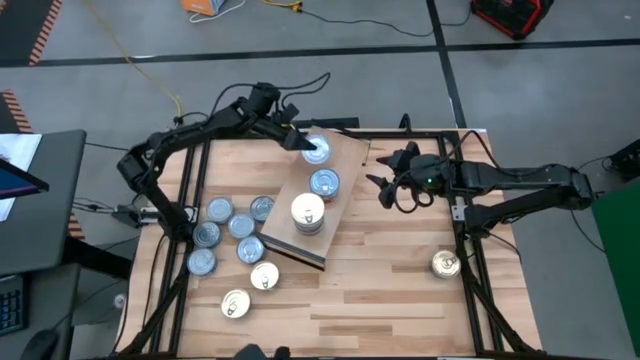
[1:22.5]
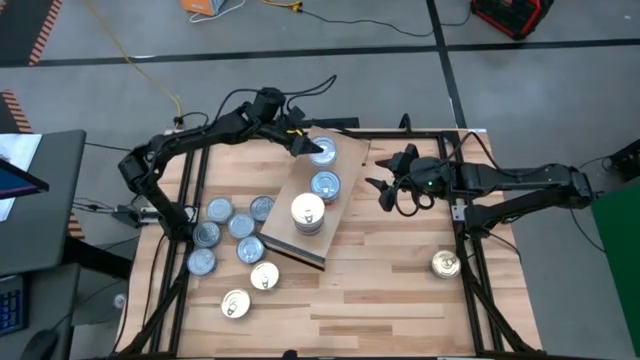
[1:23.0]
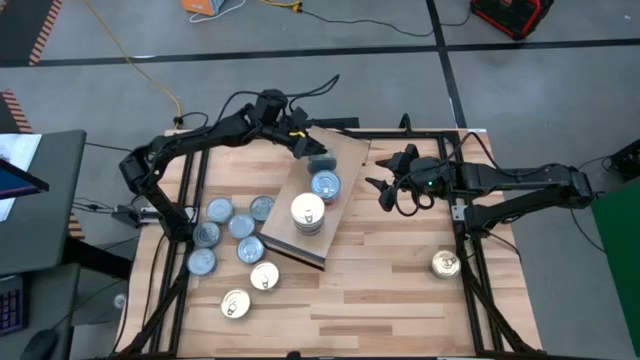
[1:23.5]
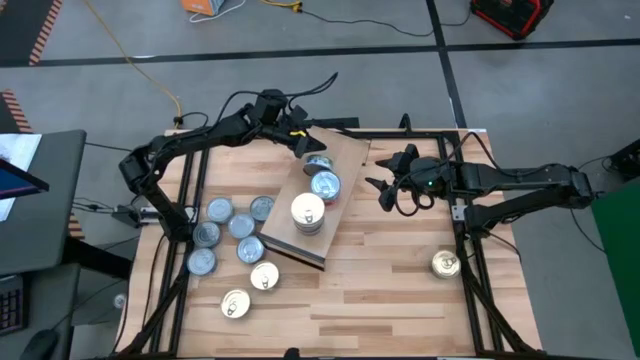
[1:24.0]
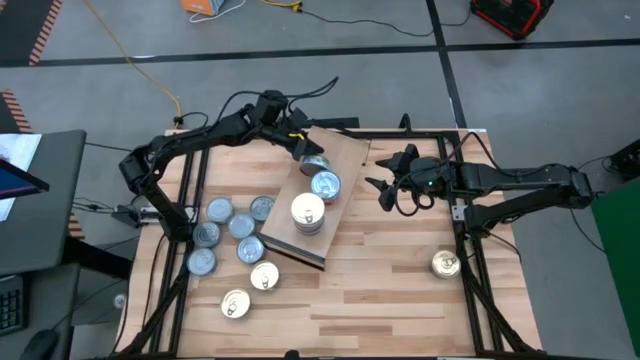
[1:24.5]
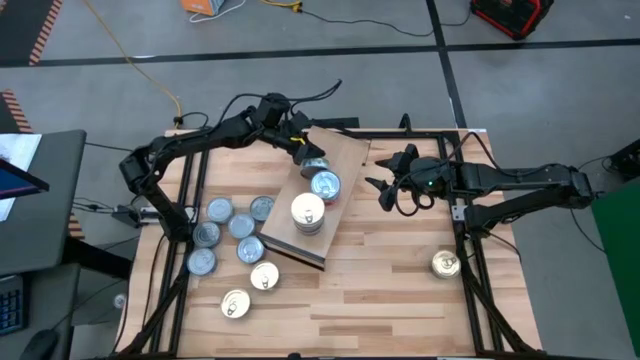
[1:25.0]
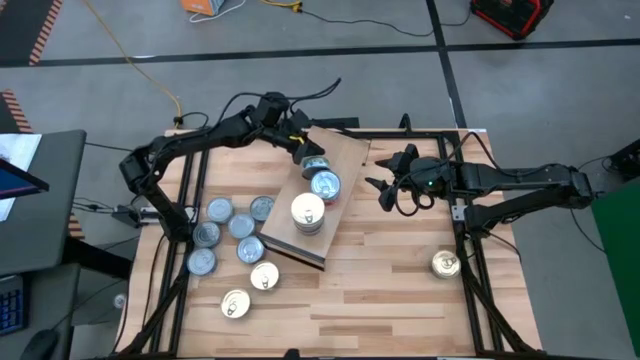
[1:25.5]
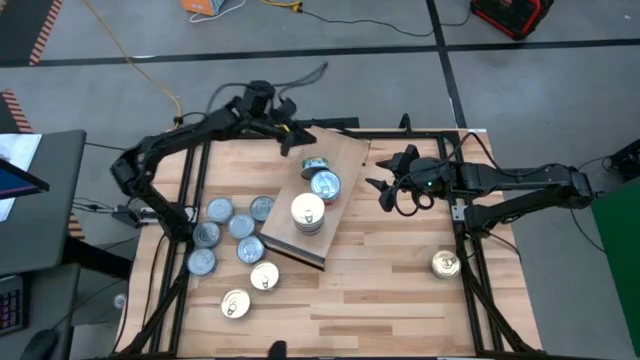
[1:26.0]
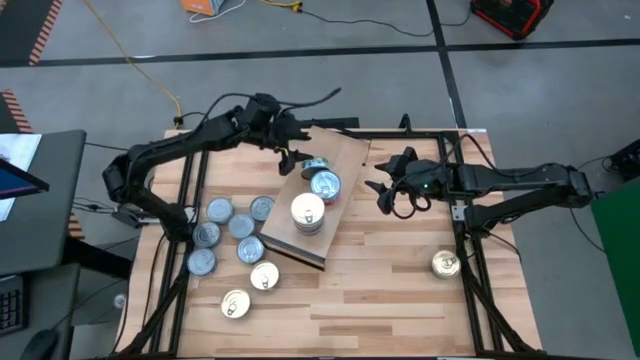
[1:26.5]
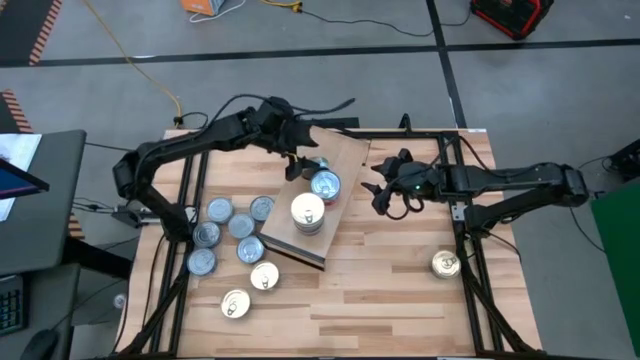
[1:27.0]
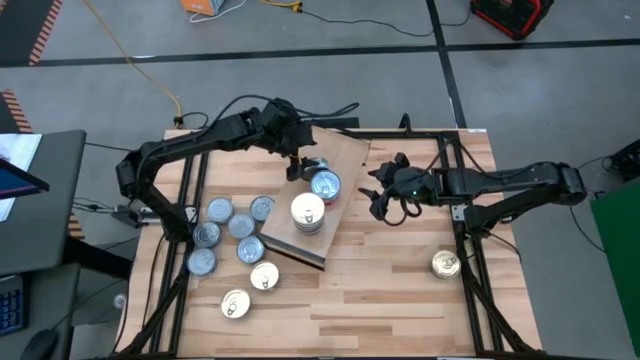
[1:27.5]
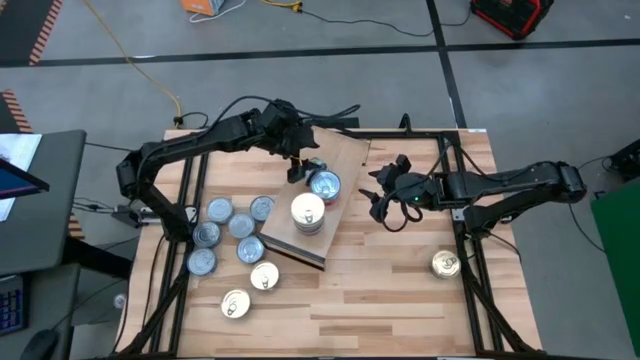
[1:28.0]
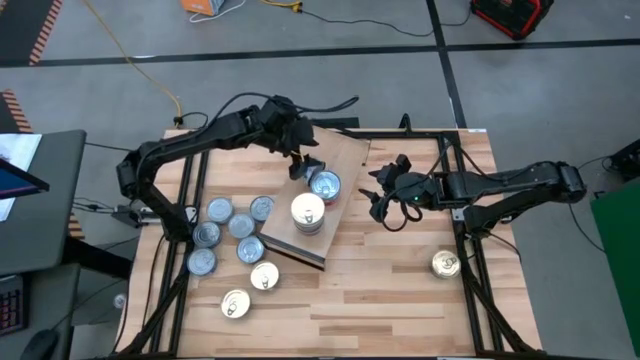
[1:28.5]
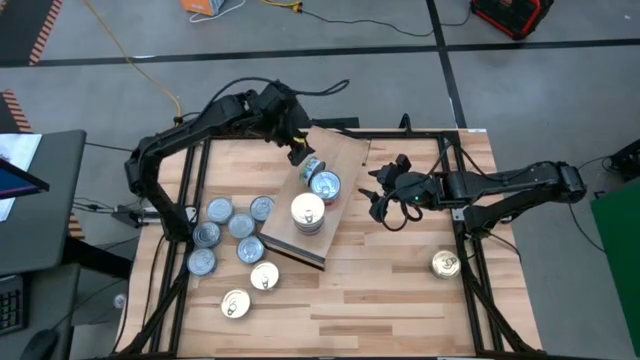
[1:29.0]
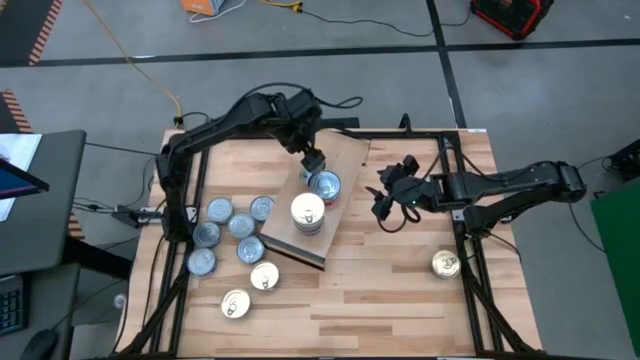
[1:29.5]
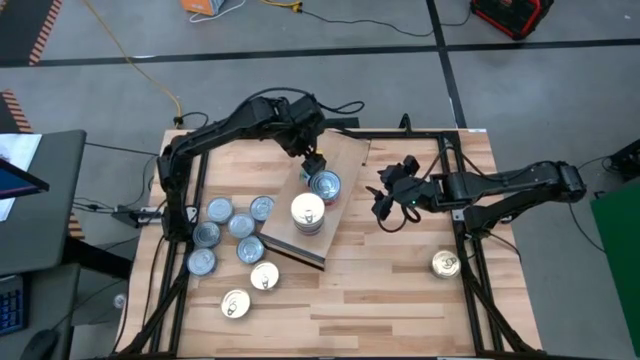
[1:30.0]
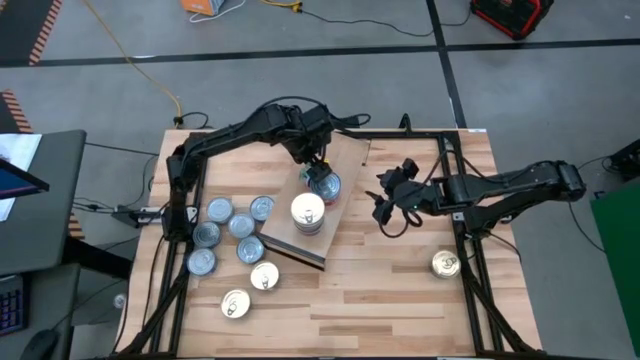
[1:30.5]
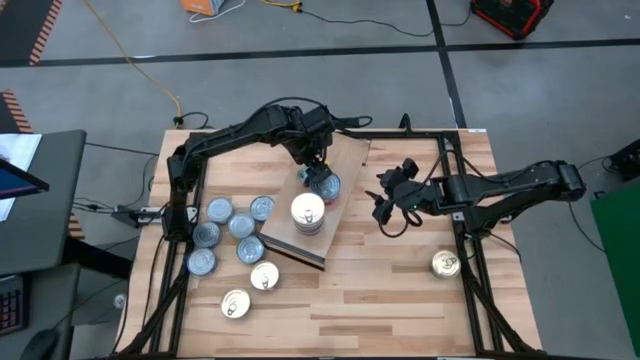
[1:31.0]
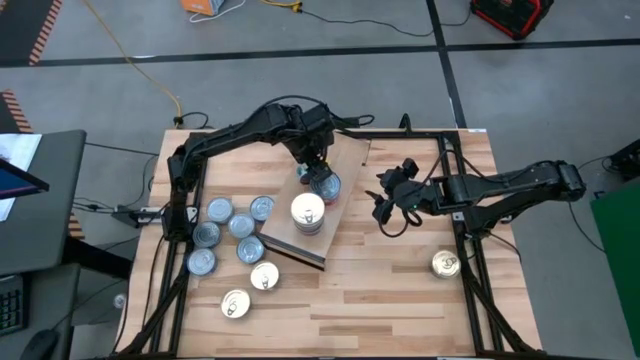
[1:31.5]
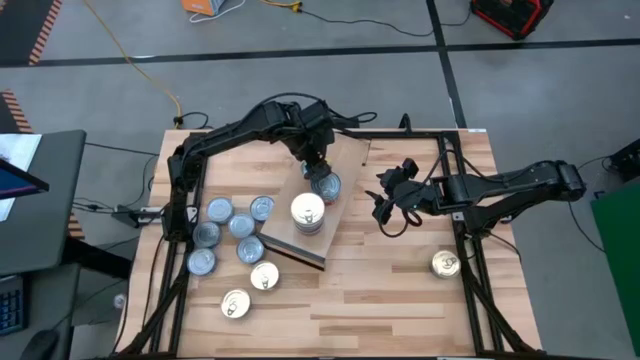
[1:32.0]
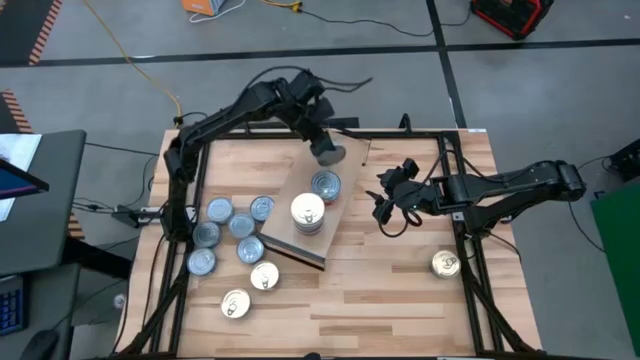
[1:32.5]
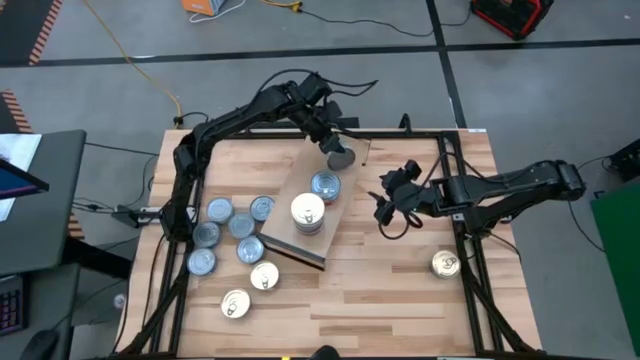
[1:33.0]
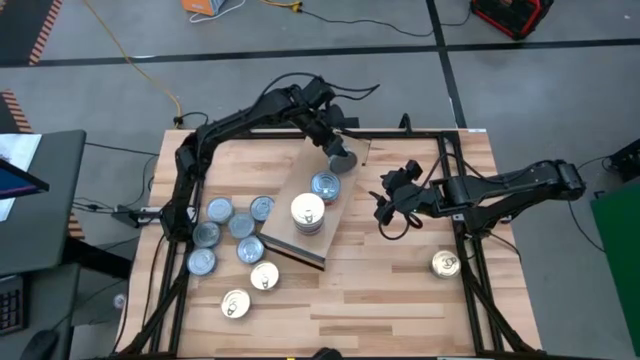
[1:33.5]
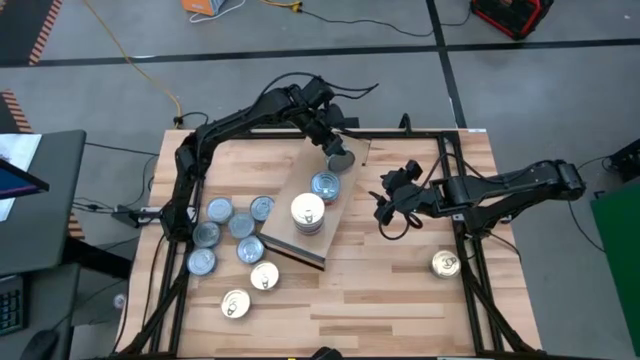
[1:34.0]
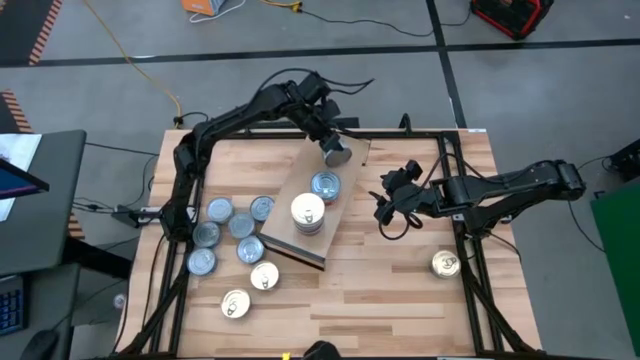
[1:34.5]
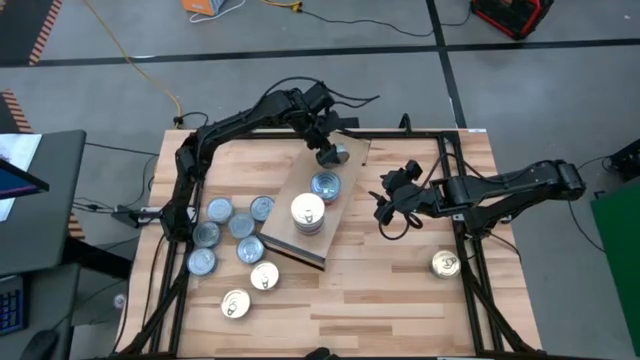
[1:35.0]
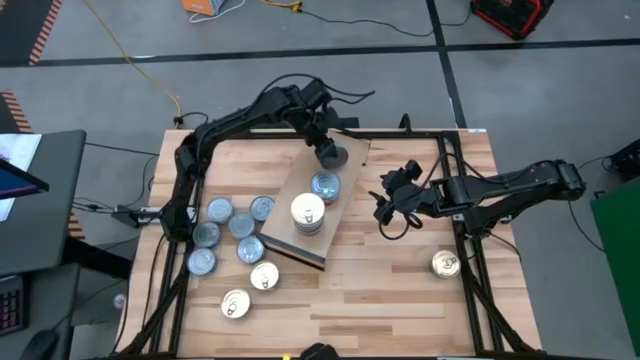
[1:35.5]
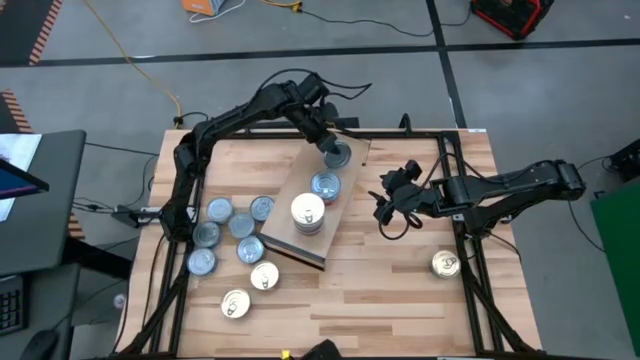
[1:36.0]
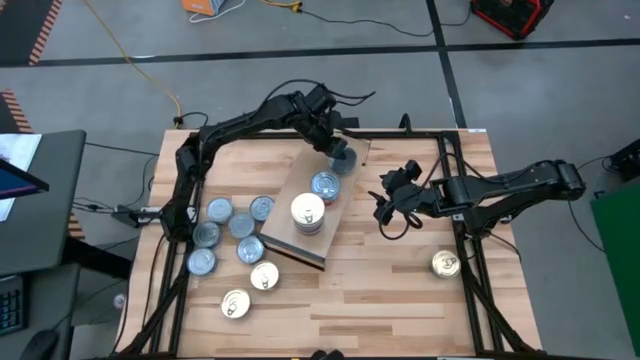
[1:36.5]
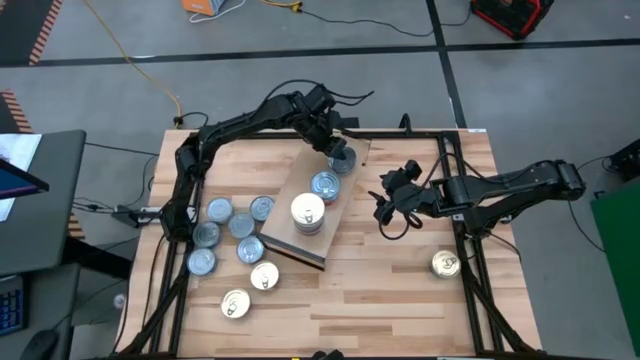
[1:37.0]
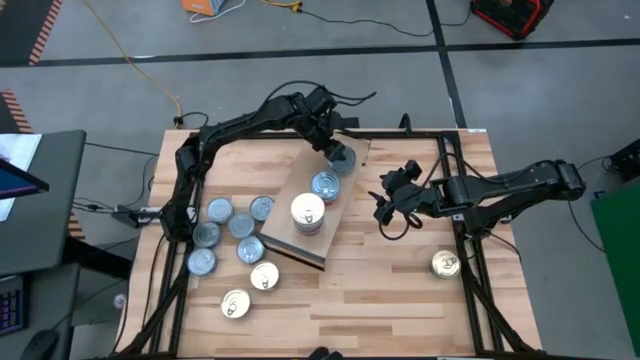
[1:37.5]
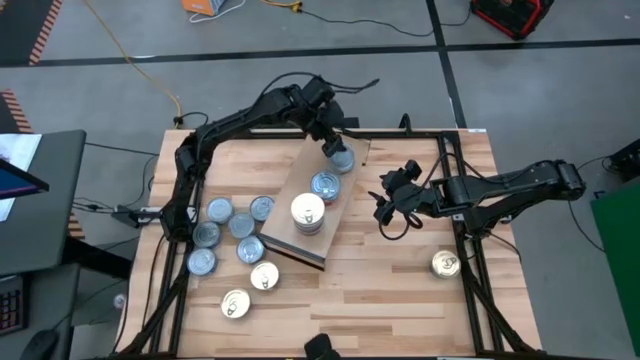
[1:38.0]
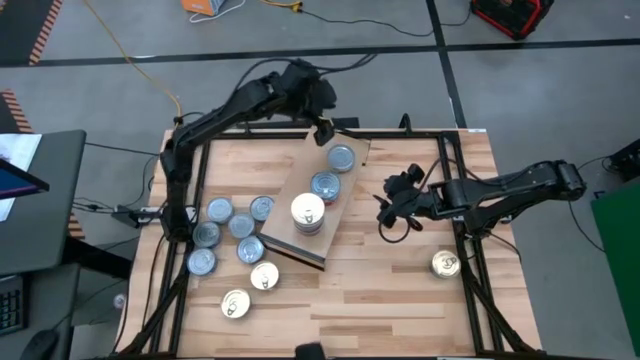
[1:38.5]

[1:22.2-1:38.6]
Task: Stack canned seafood by type on shelf
Put the green white tuna can on the shelf

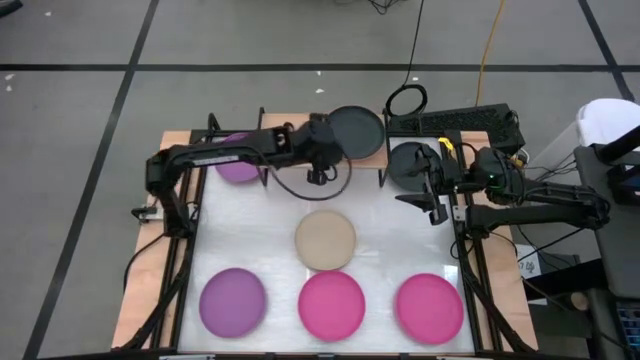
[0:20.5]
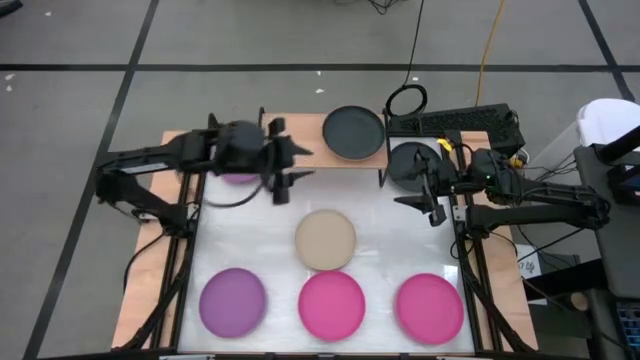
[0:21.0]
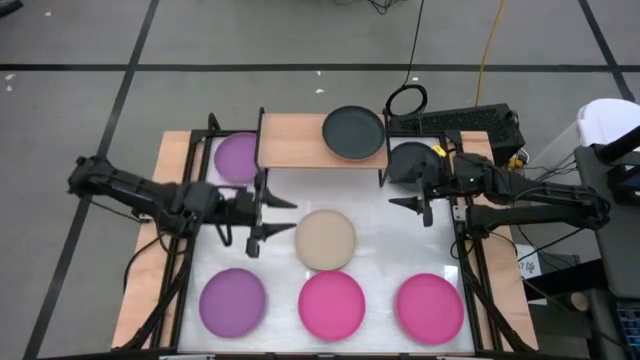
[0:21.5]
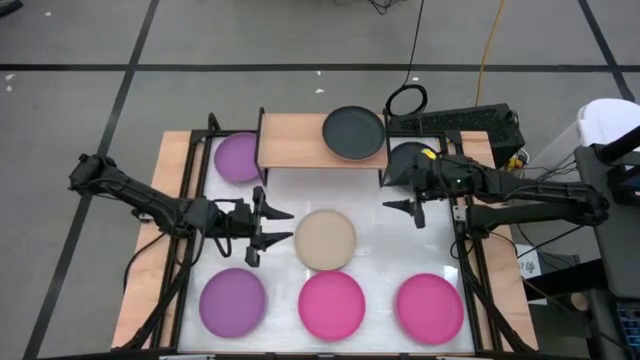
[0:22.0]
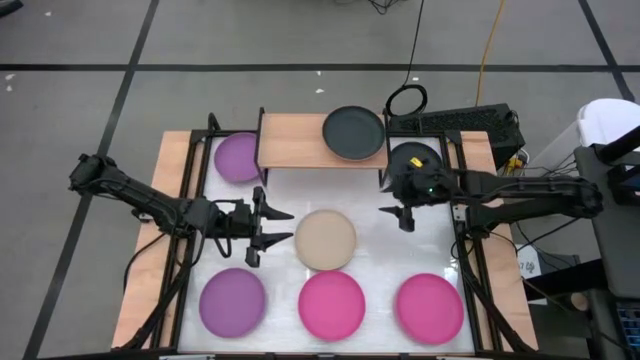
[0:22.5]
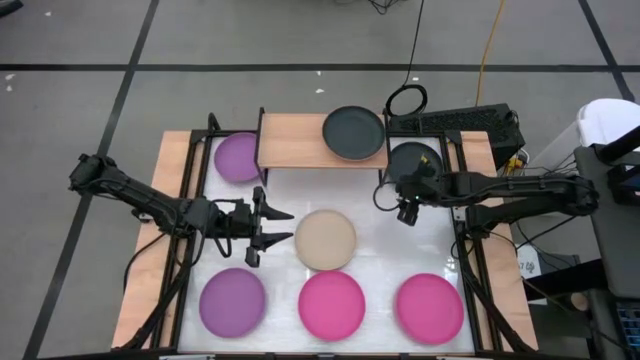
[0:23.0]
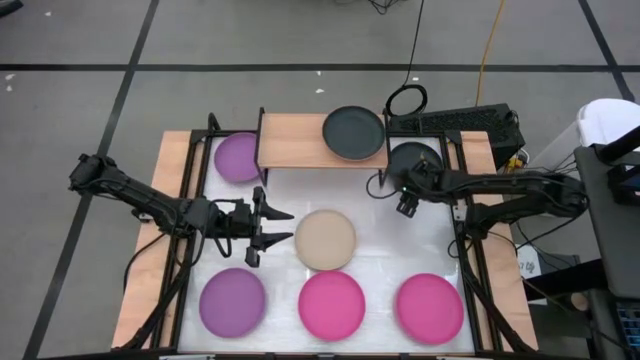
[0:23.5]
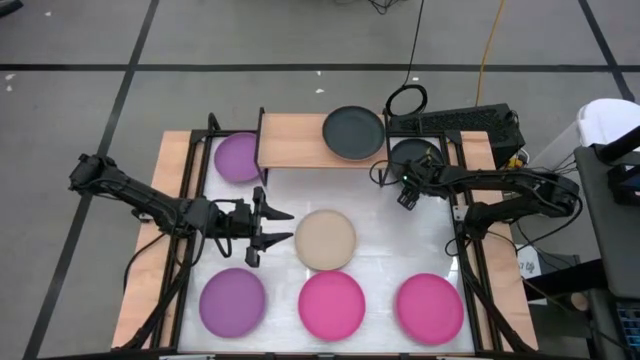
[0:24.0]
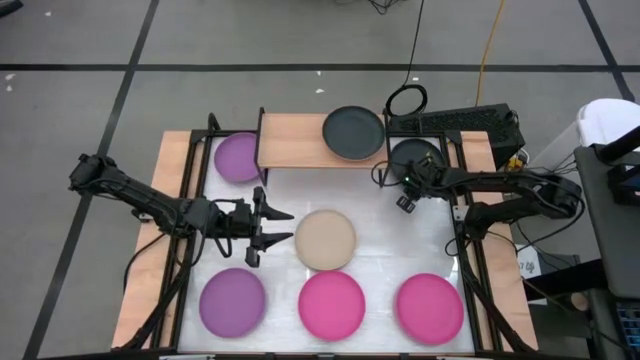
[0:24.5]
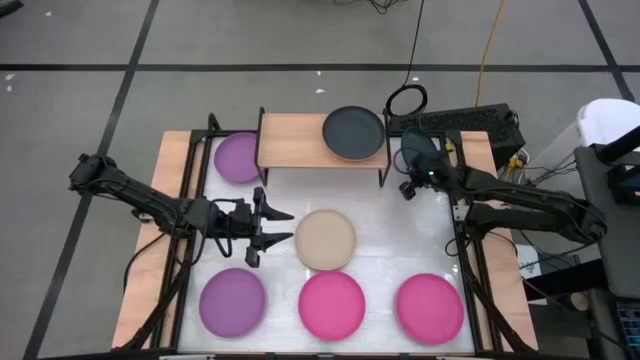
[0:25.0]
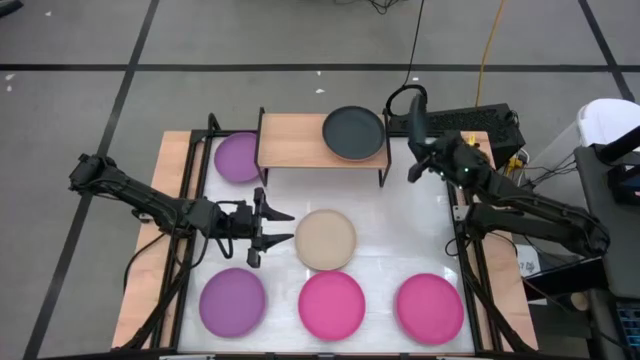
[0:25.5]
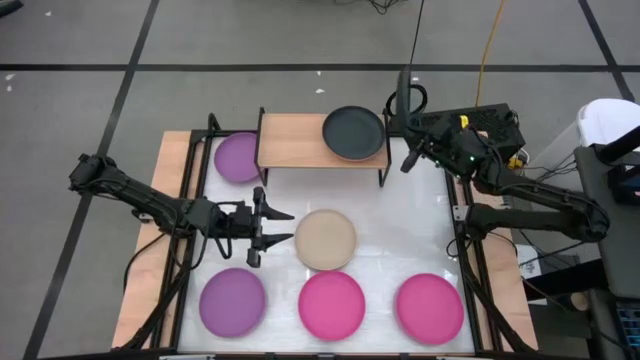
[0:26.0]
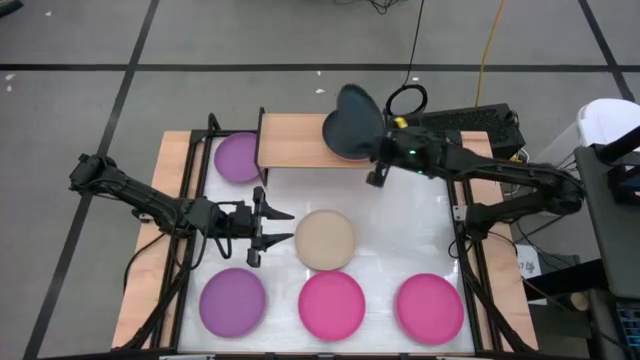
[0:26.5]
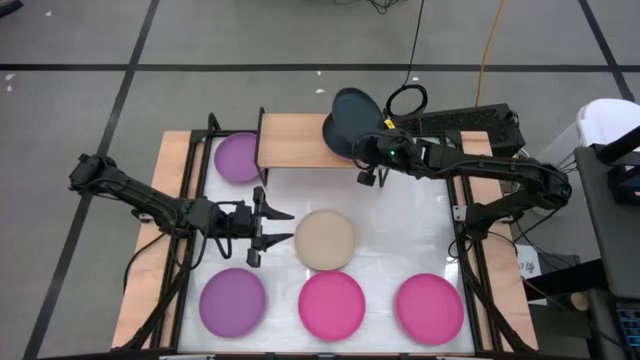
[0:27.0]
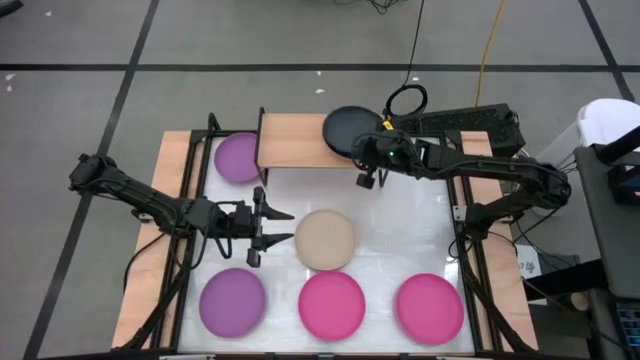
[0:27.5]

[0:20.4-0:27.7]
Task: Place and stack plates onto a shelf
Stack the black plate on top of the black plate on the shelf
